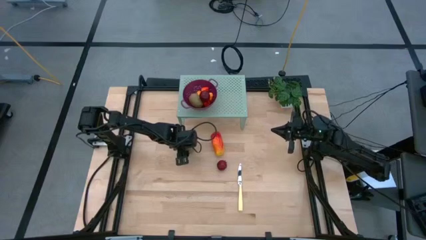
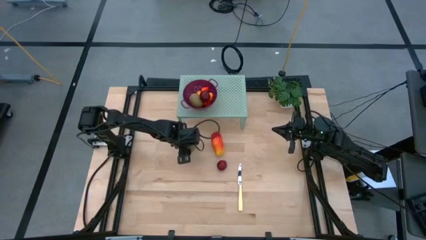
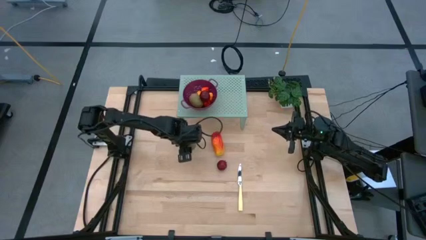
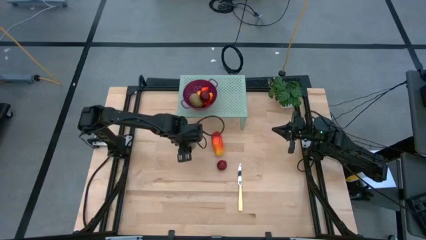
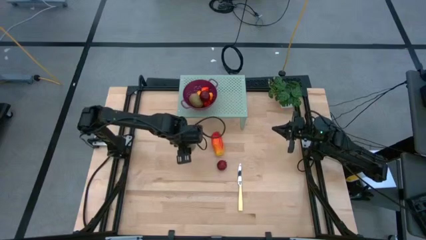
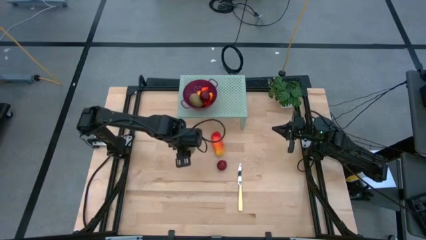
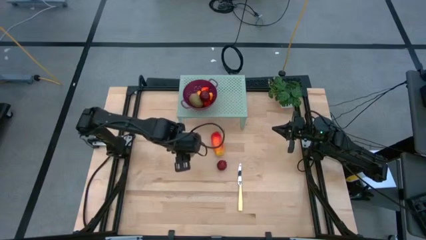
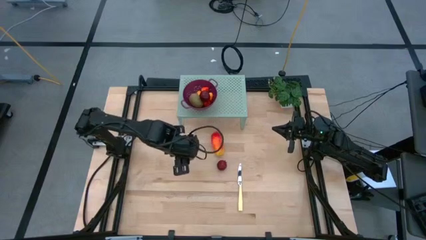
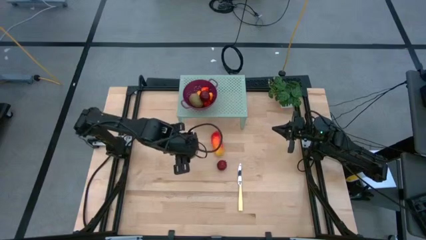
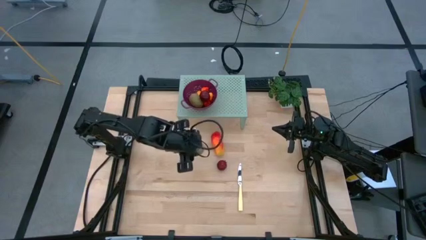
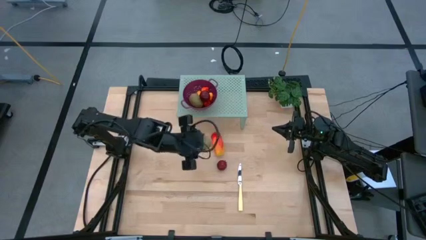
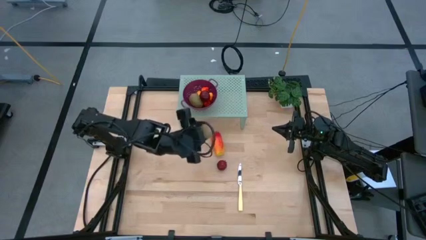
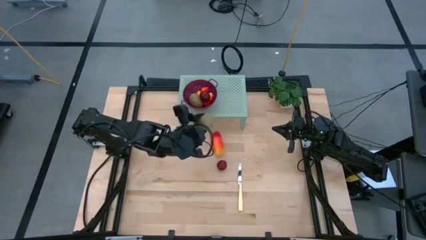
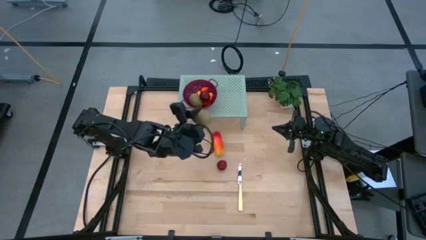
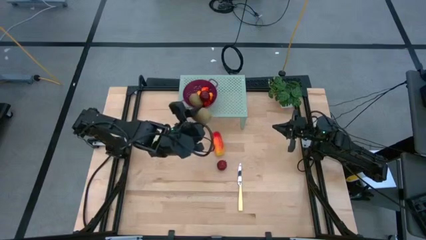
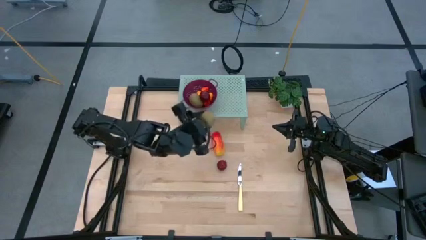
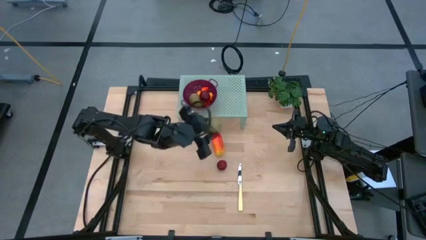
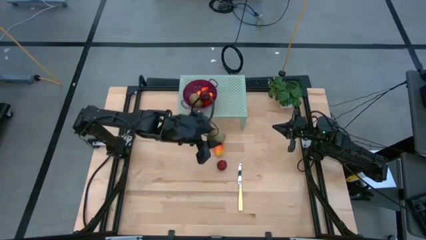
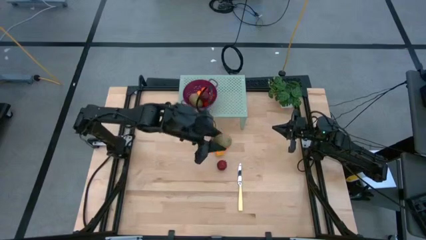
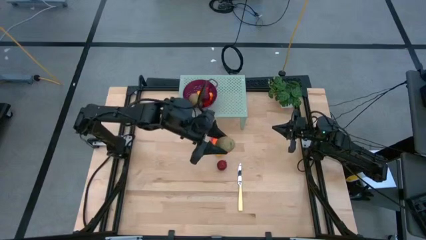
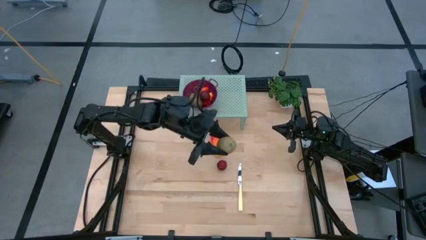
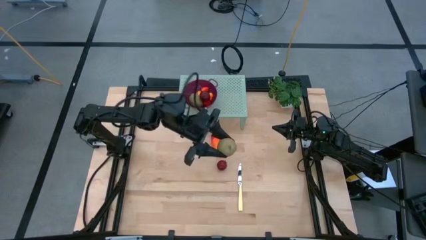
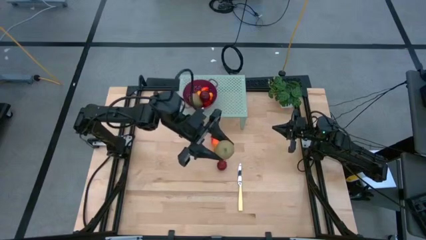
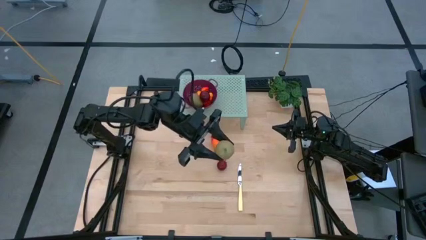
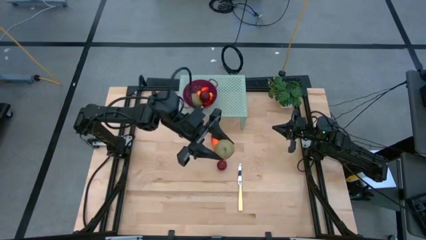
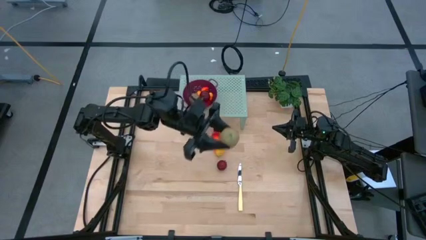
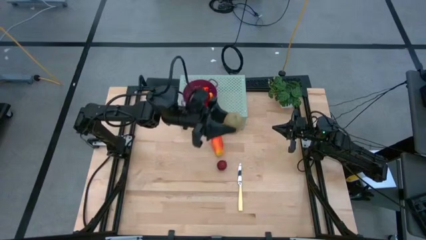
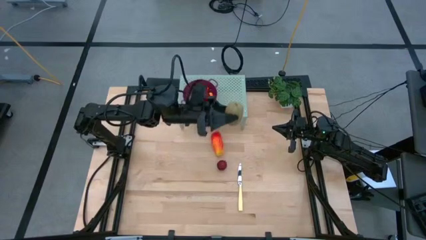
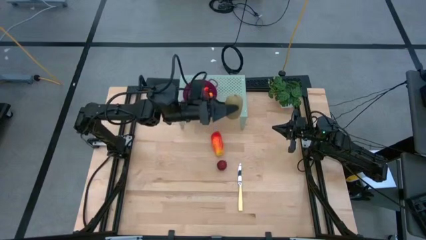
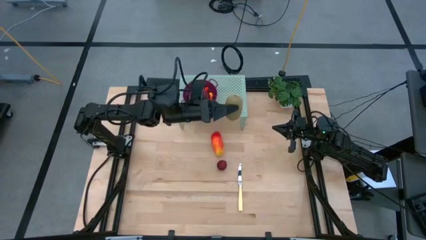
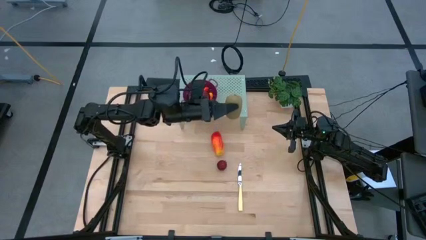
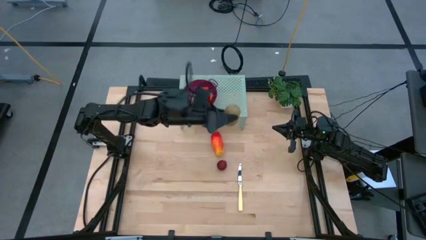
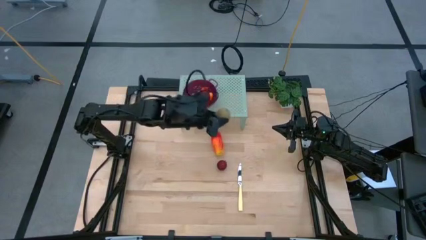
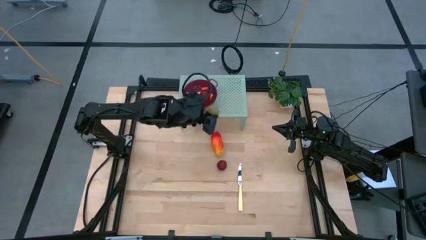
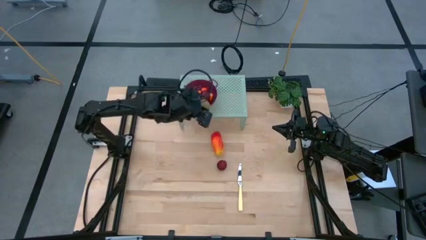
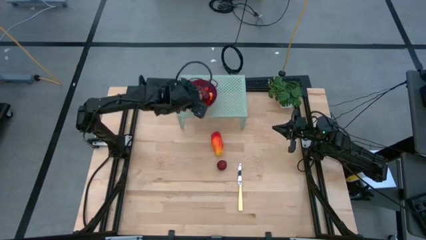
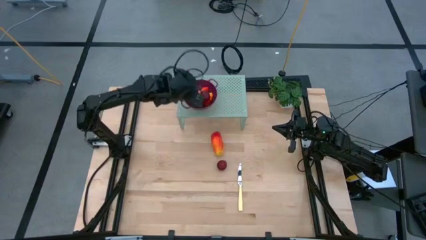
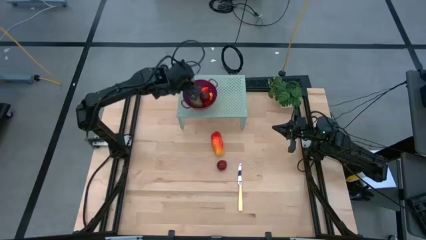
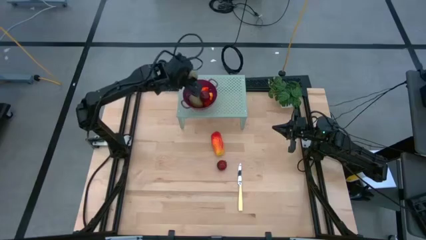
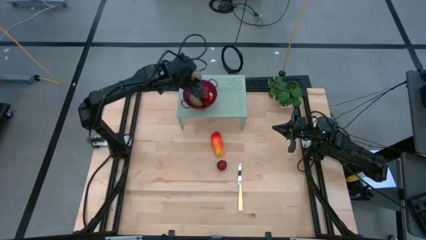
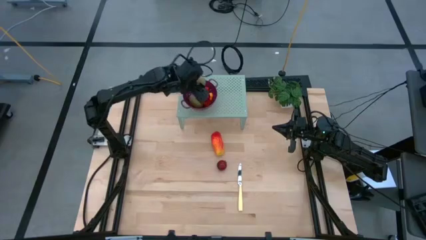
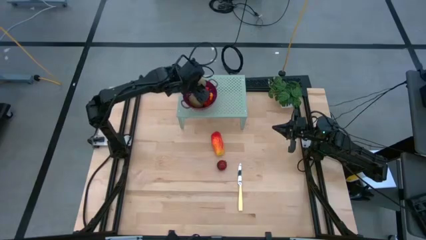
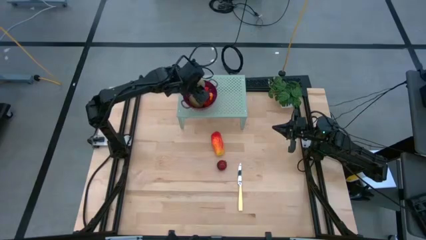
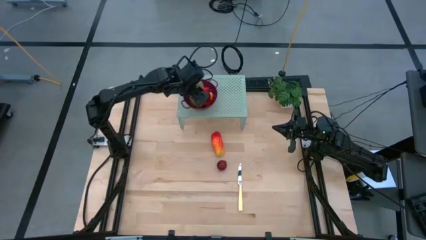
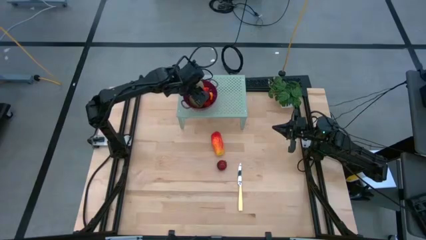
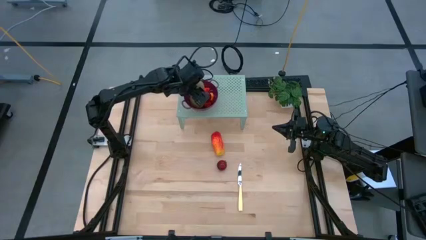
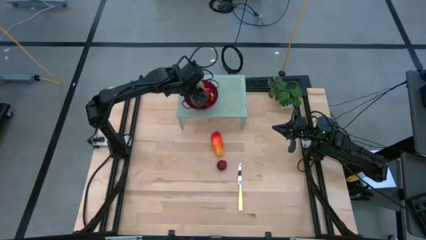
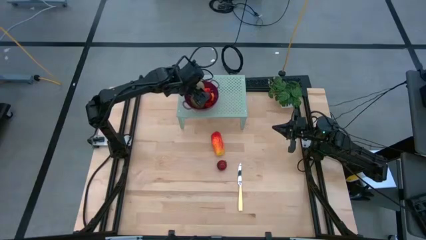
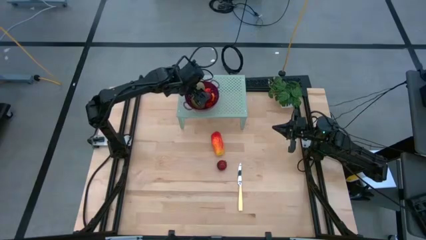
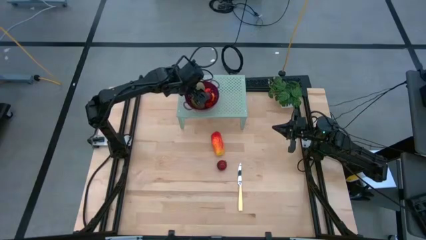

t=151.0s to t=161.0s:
Task: Pick & Place Fruit
Put the kiwi into violet strainer bowl on the shelf
